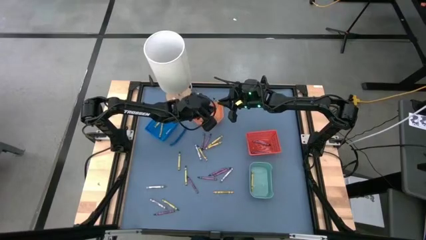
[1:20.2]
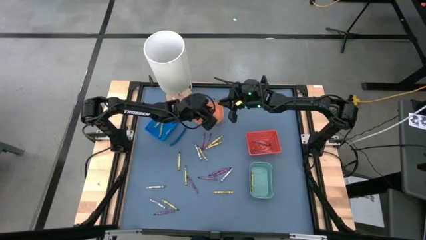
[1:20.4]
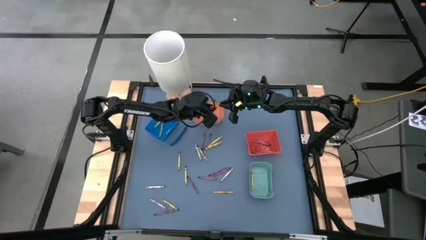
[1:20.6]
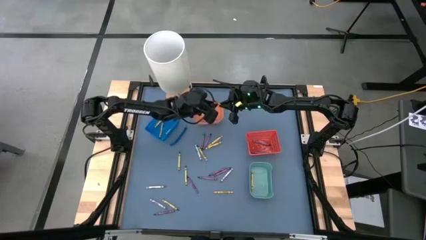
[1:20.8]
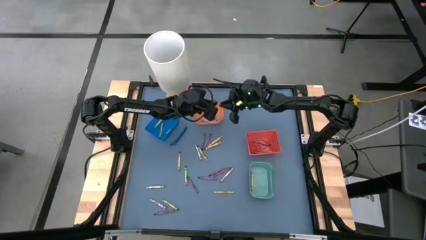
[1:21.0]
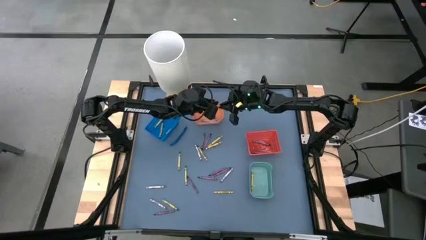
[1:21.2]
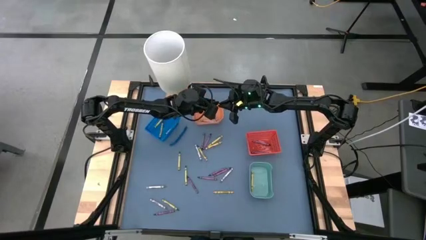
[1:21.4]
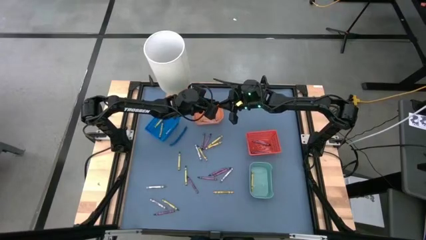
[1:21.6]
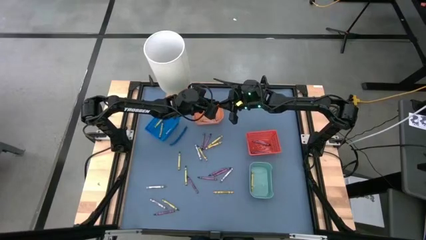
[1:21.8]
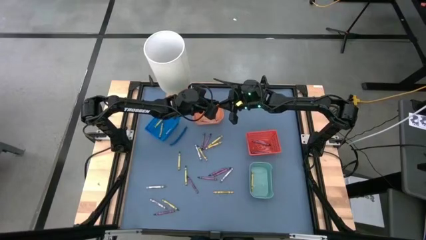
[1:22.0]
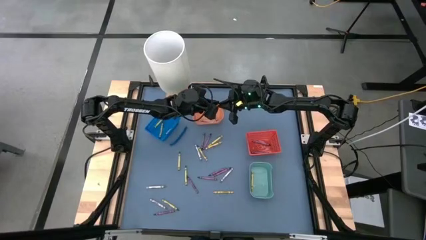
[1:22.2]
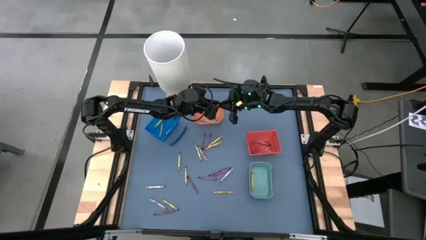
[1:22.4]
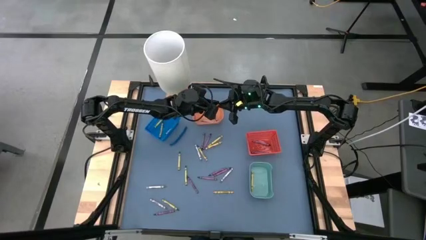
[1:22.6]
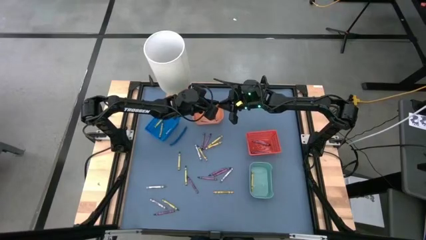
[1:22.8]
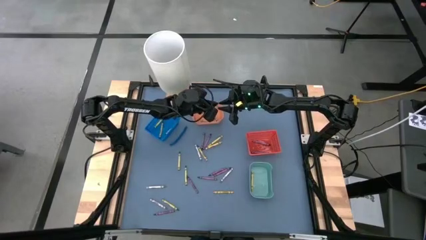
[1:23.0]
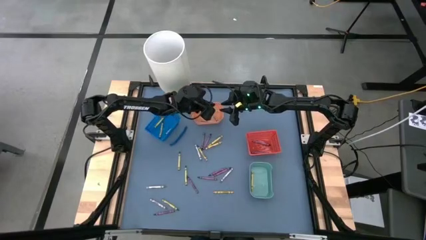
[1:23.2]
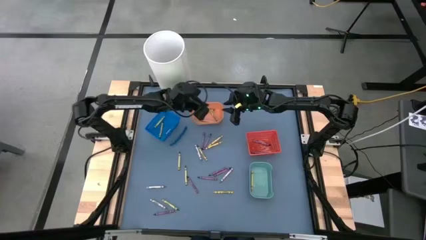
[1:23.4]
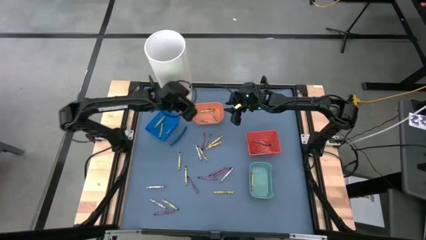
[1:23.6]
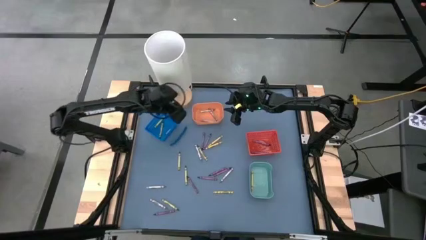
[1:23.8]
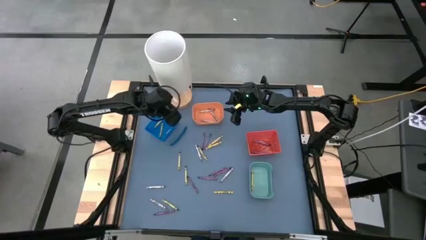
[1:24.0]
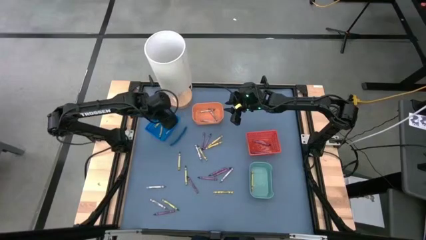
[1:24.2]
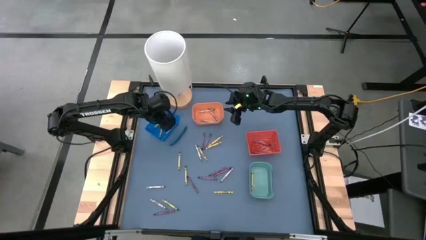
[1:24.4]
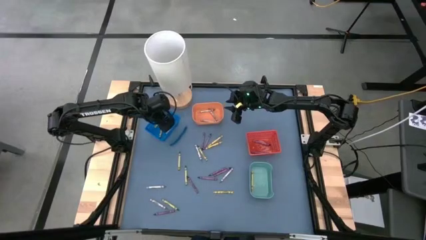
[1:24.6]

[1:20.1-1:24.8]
Task: Sort crayons
Put the green crayon into the dark blue bin

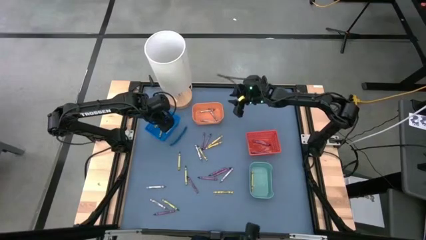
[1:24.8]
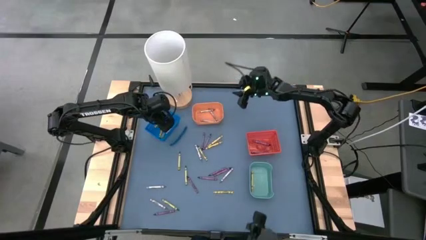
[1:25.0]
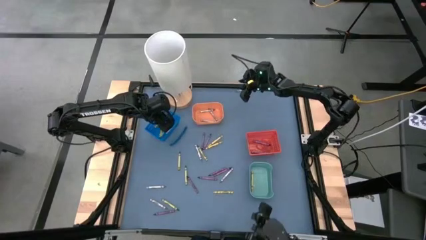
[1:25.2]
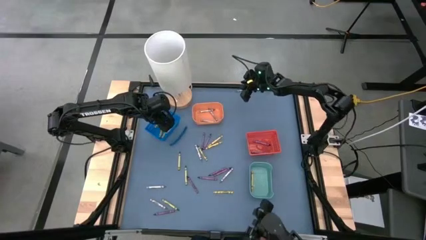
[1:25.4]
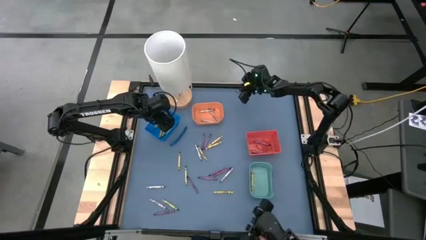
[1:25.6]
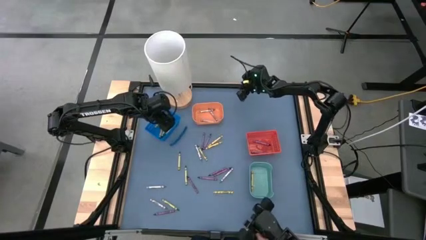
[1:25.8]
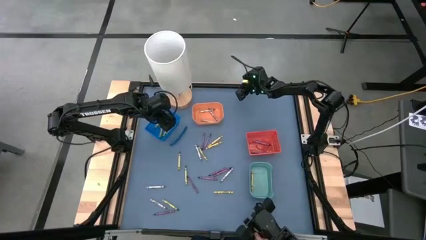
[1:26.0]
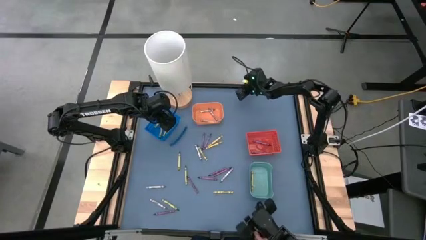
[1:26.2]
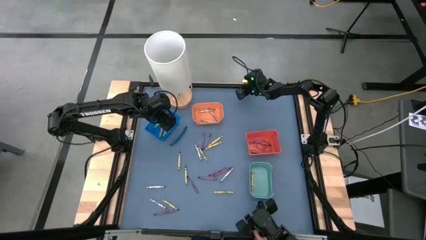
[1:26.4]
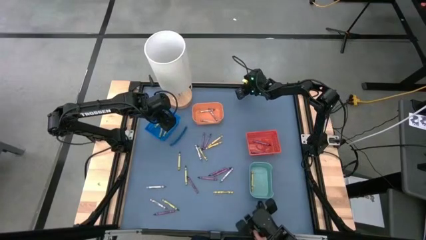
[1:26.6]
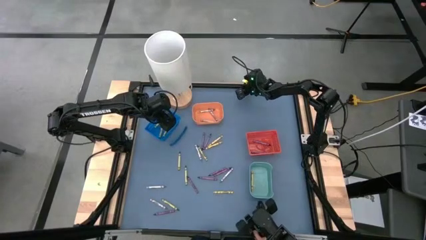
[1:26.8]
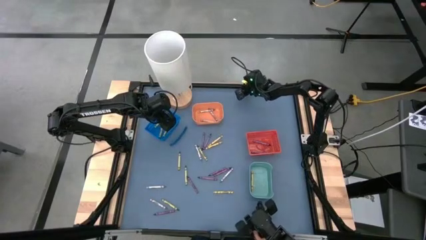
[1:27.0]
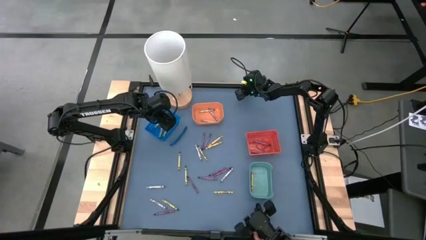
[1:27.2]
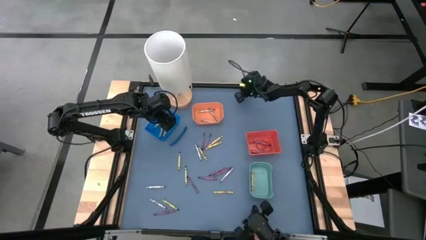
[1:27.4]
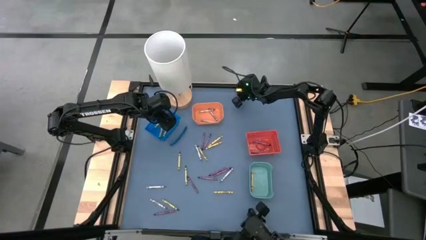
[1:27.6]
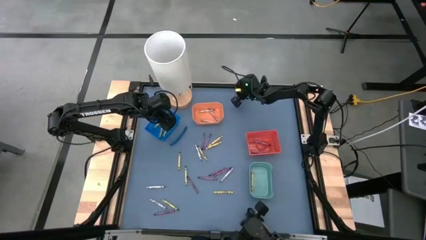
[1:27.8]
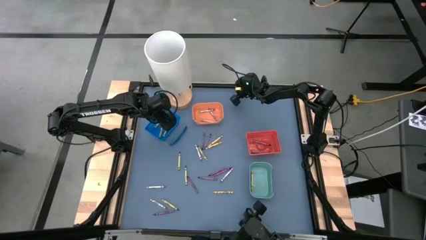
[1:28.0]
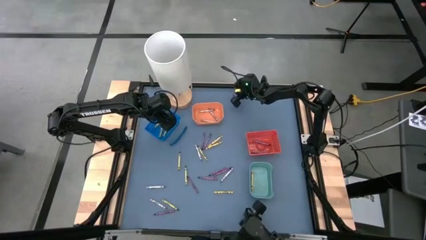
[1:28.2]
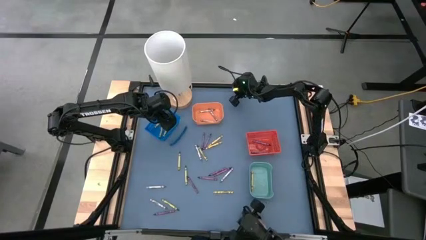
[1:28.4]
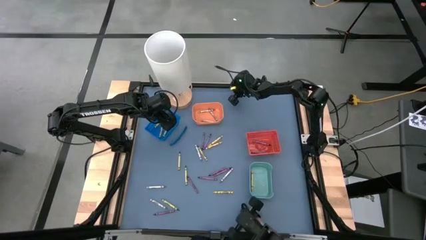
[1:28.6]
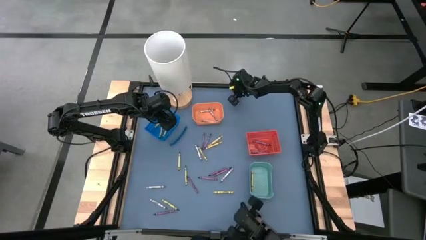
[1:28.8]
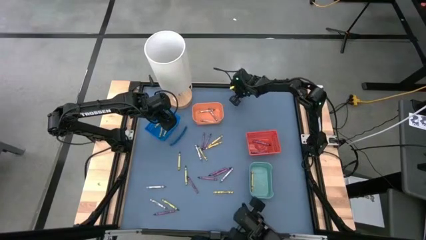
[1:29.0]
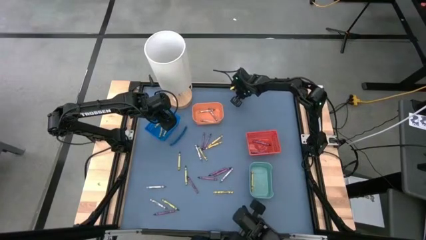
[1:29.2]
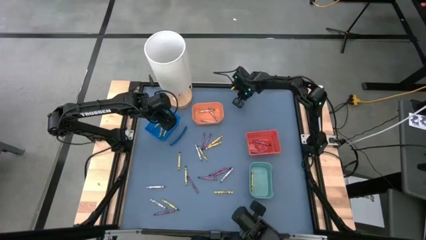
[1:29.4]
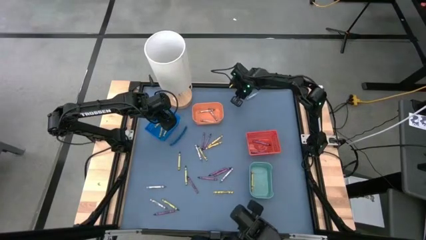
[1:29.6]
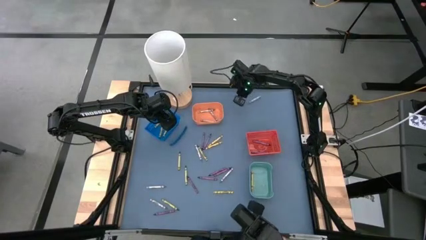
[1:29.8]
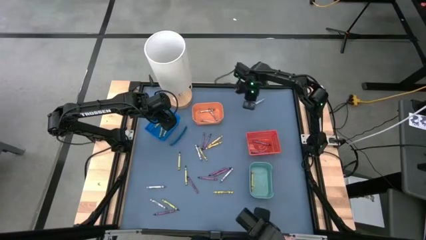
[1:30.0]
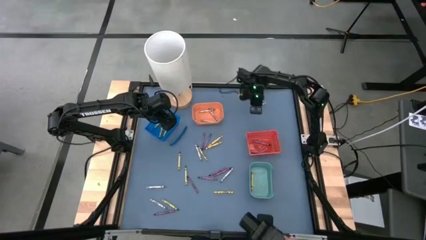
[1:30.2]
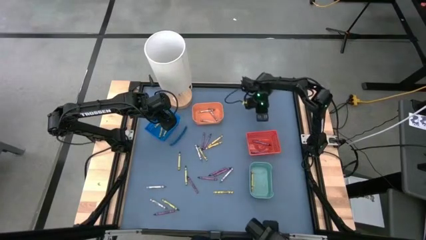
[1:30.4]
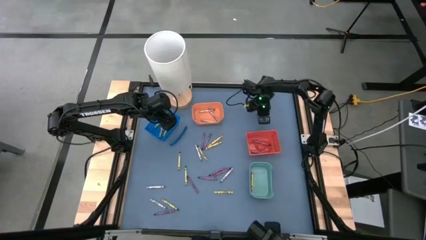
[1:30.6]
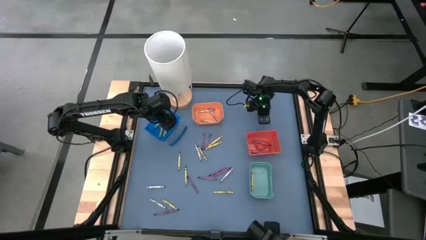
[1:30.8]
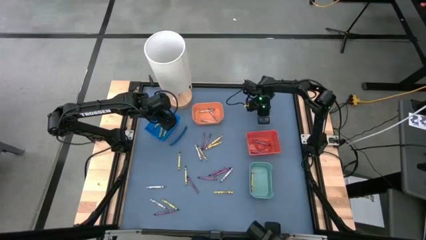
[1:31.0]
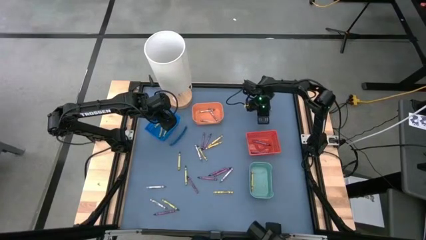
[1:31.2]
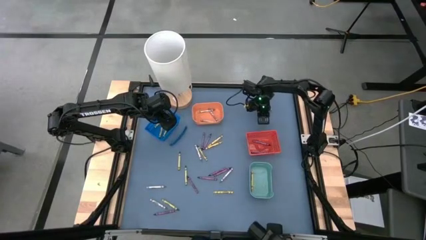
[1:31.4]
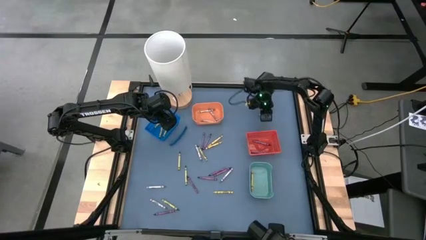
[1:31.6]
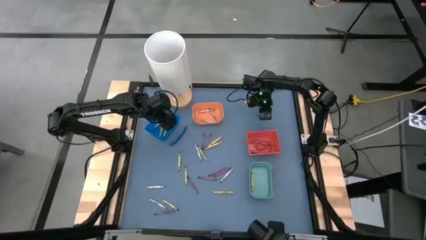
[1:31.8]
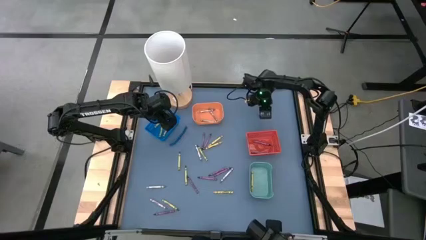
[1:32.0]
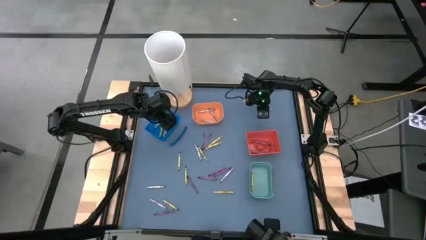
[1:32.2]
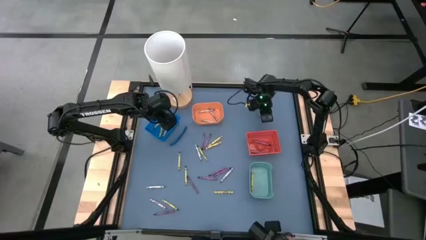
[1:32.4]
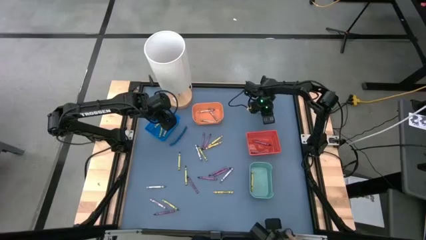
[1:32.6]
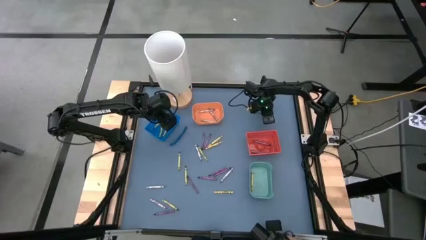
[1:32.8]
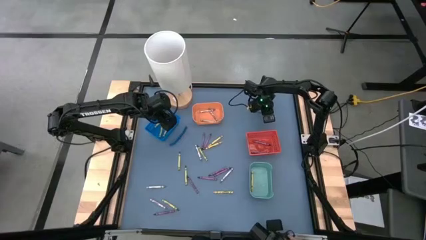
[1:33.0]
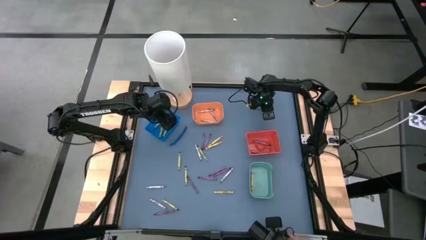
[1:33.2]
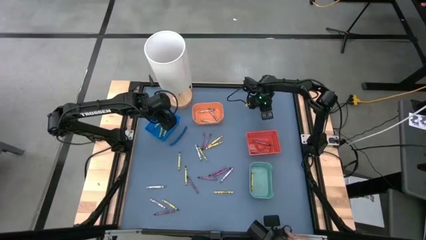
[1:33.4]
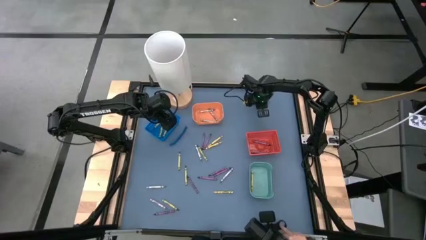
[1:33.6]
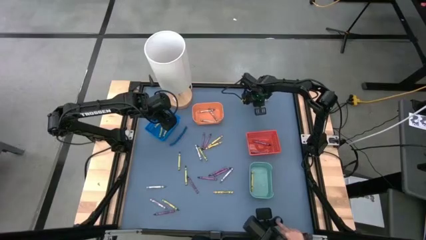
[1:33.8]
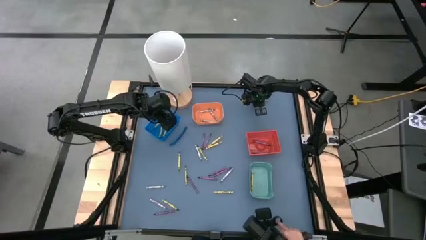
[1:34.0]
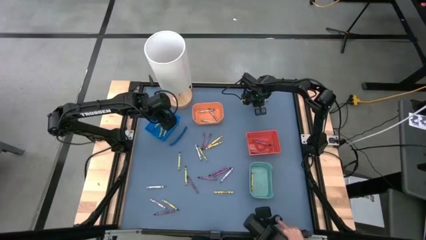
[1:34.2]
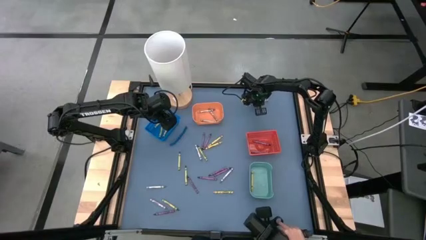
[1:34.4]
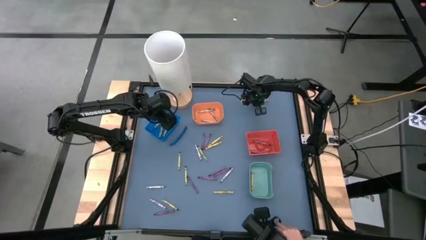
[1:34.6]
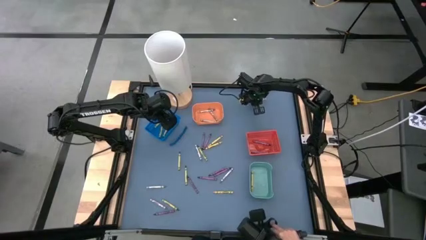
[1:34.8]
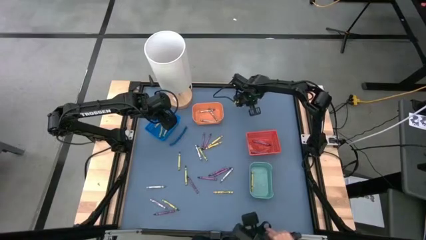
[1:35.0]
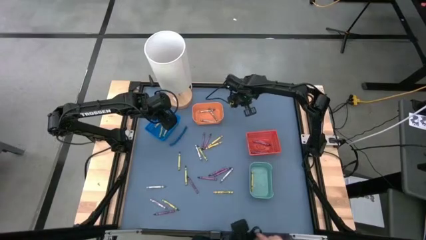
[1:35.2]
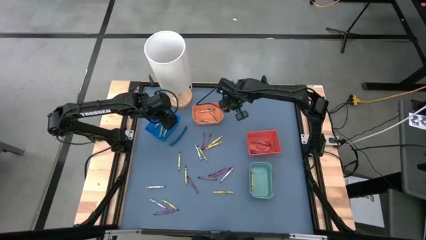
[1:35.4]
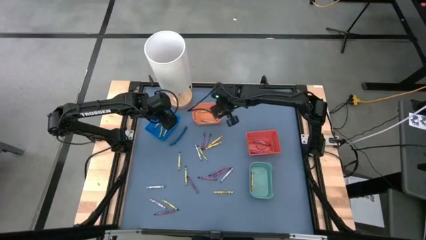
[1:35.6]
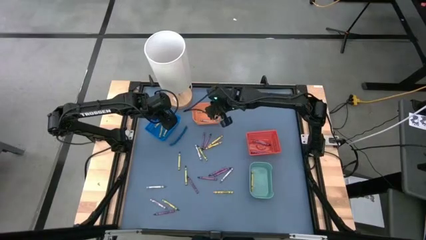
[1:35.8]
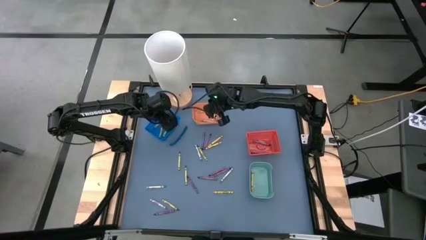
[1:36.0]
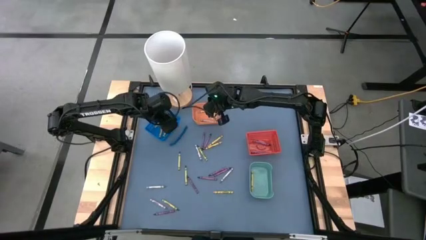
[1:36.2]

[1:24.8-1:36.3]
Put the gray crayon into the orange bin
